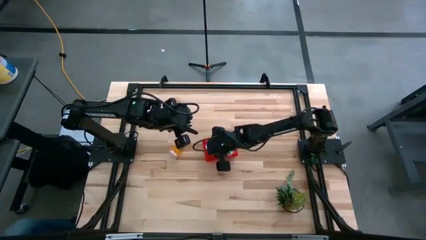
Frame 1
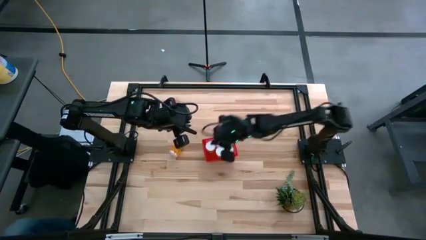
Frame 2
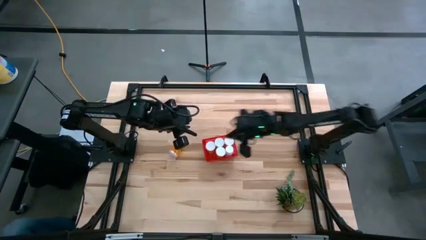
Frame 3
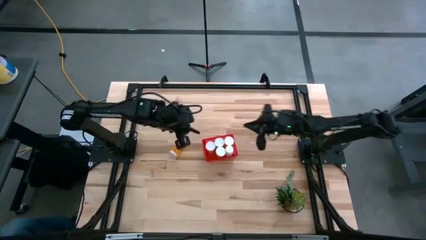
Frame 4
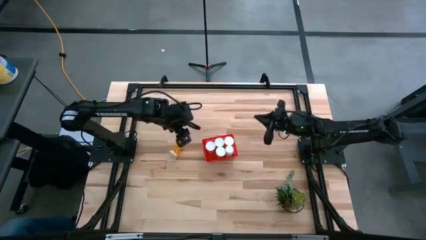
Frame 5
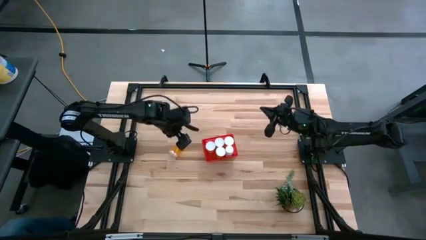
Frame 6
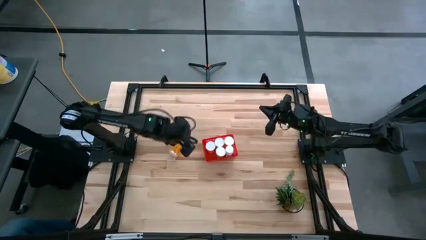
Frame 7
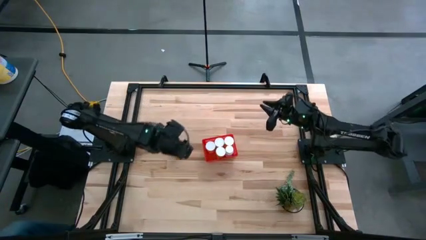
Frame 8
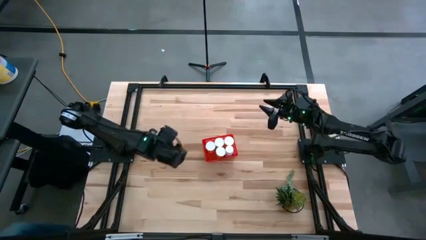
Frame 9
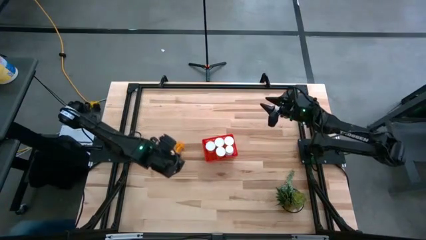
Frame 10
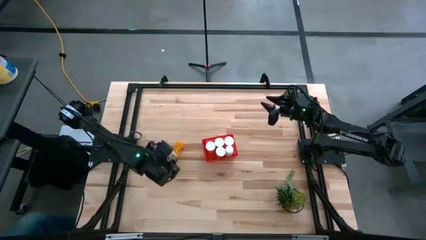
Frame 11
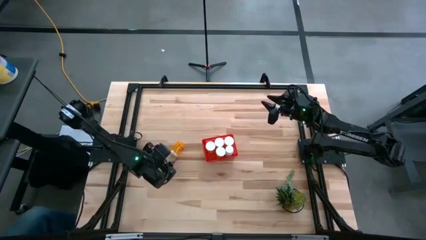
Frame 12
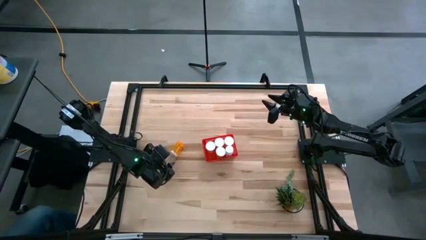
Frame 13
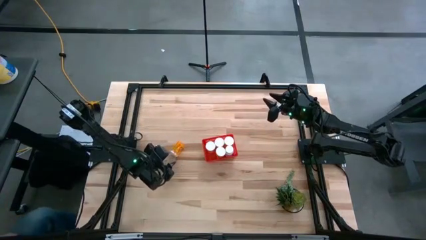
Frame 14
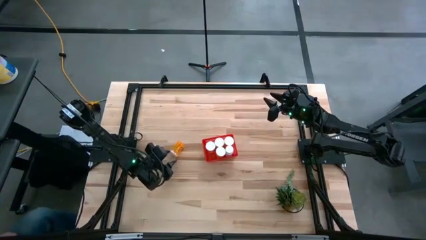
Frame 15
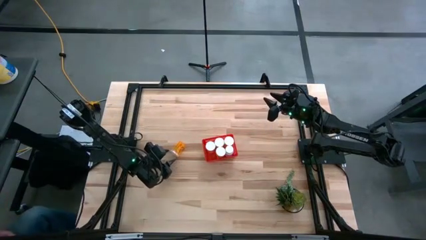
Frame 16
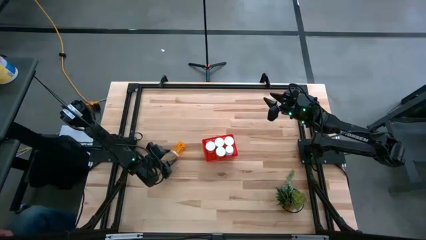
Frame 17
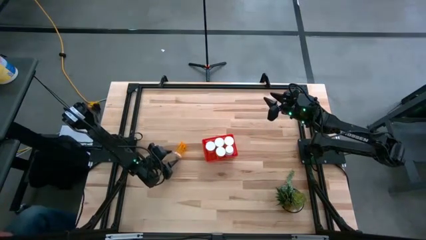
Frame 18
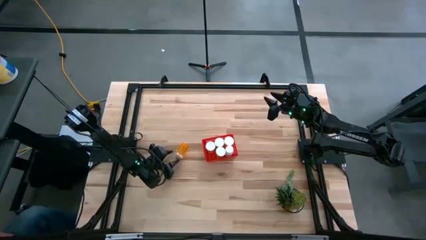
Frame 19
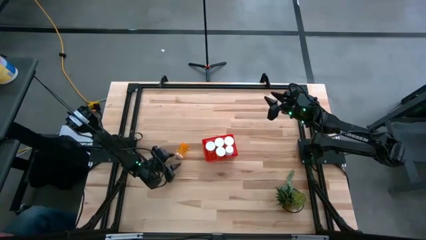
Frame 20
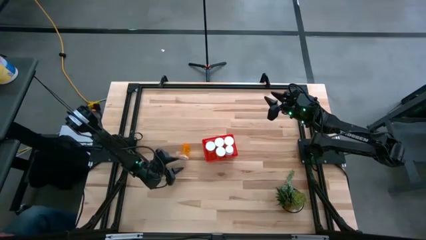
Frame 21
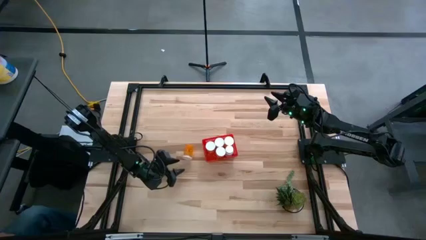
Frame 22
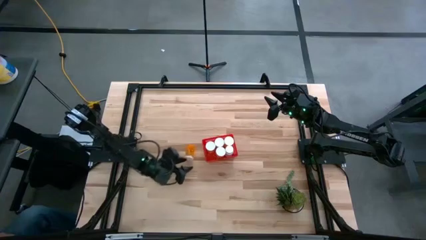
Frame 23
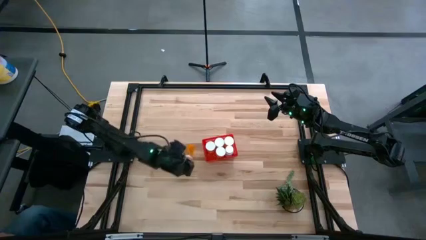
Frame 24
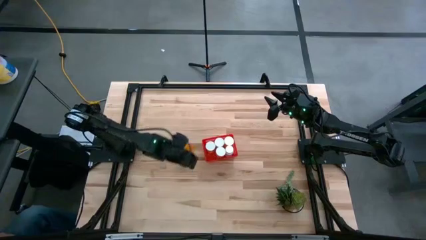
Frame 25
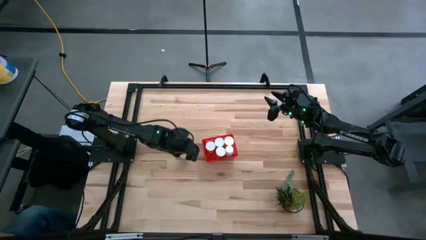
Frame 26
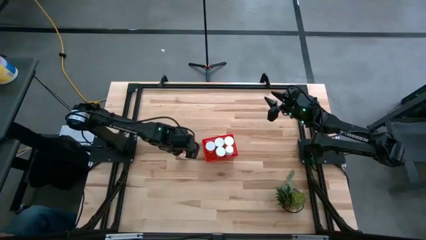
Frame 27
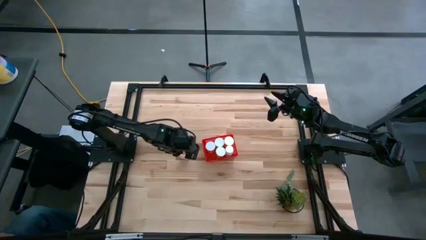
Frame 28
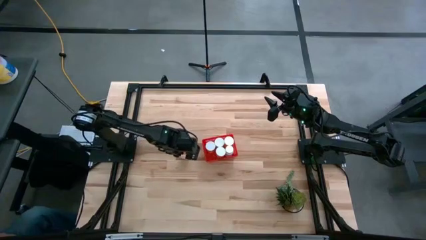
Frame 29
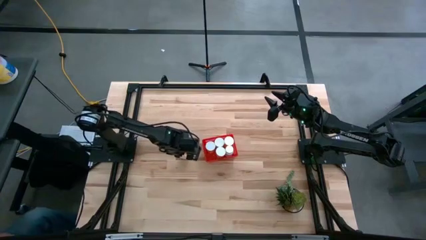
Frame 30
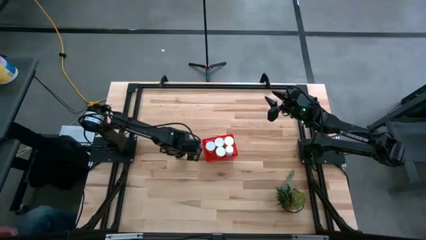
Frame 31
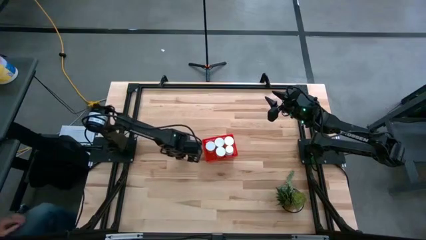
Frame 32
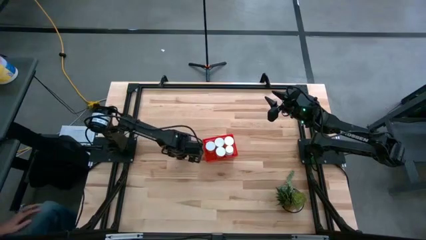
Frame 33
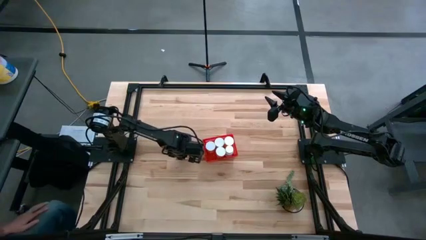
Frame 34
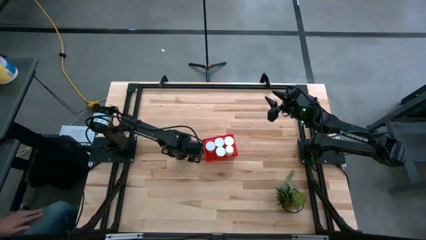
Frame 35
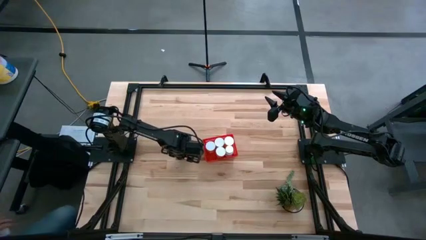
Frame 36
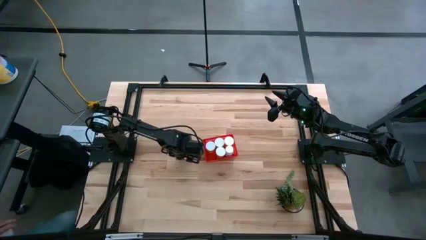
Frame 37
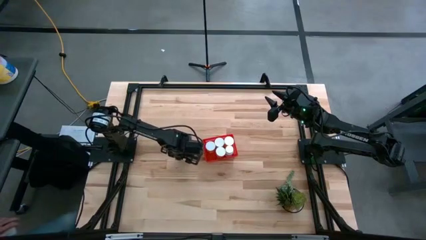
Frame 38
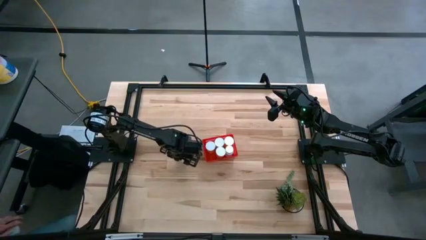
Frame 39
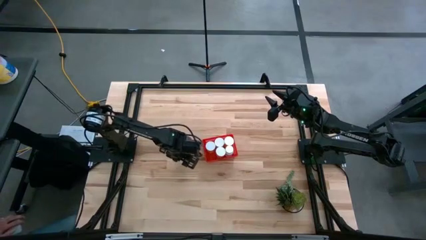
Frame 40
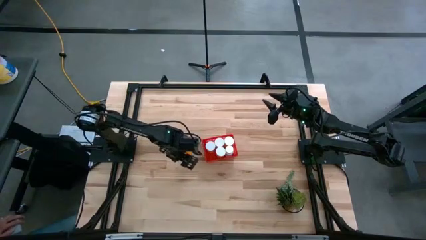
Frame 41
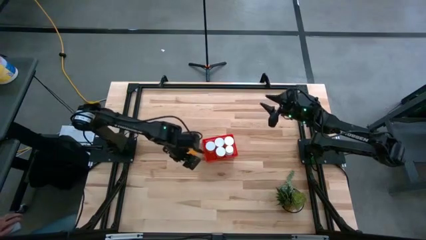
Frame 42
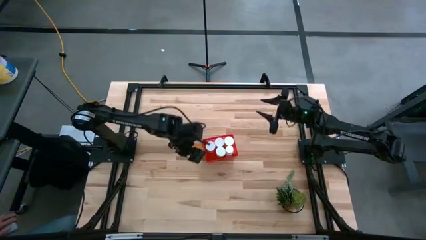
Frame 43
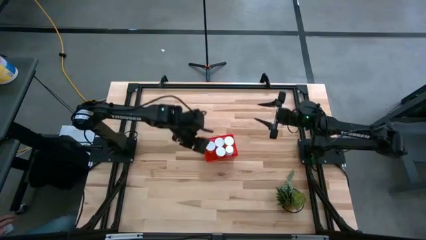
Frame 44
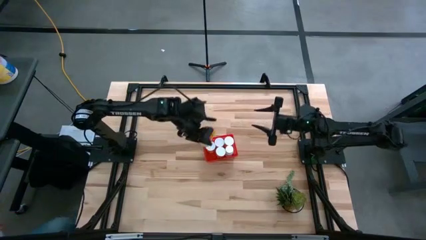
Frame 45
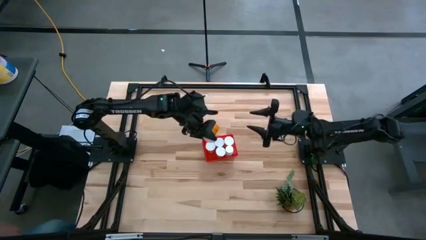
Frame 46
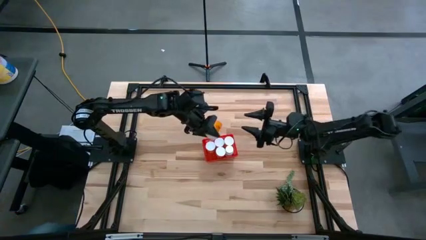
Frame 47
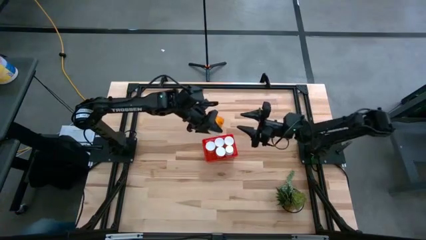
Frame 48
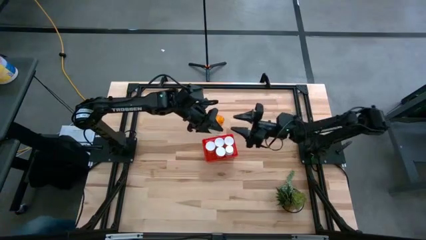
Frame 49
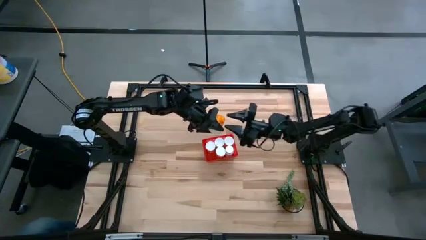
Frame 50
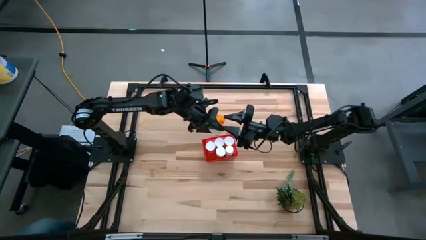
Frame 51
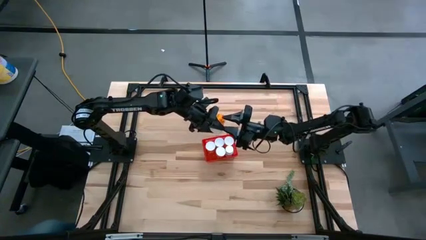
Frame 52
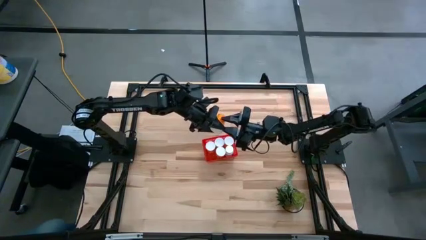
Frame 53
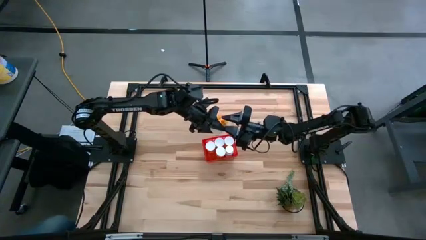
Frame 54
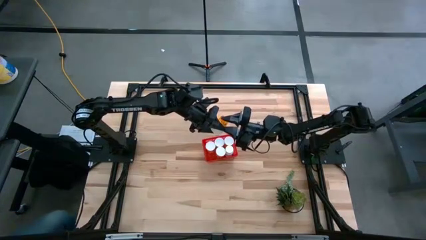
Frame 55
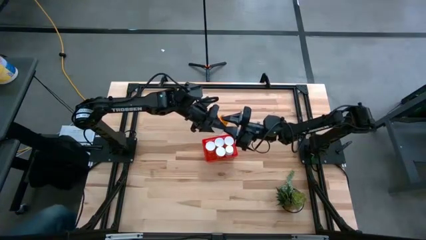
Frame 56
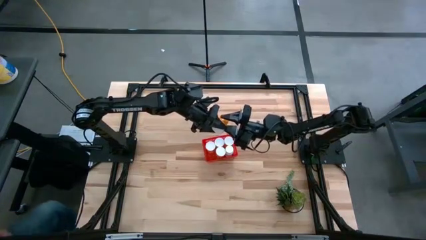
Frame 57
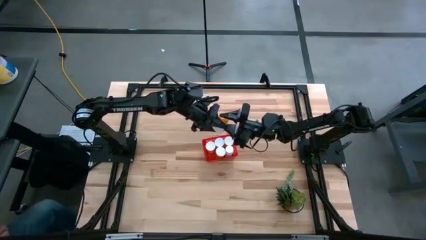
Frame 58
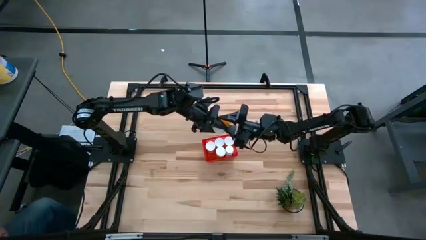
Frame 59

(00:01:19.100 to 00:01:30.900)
Task: Pick and place pill bottles into a basket
Put the orange medicine bottle into the bin
